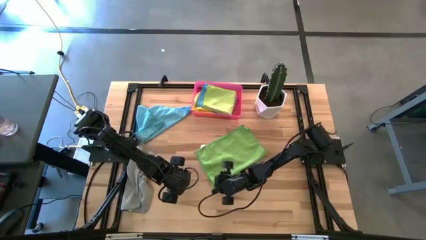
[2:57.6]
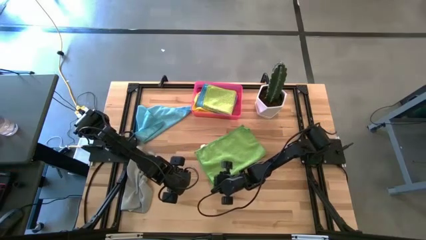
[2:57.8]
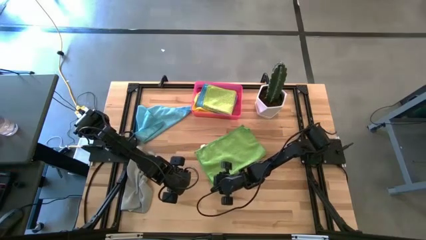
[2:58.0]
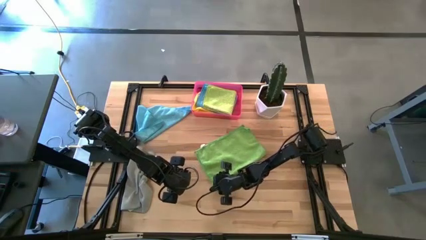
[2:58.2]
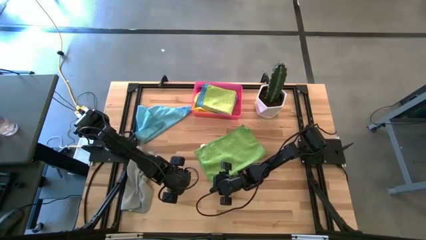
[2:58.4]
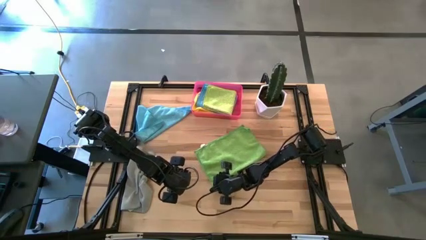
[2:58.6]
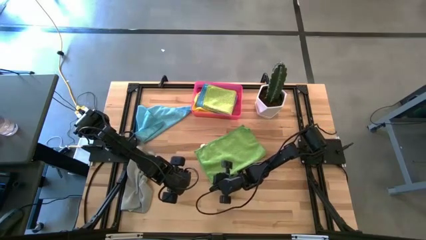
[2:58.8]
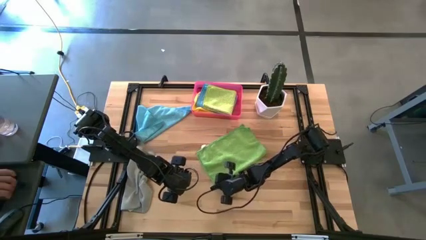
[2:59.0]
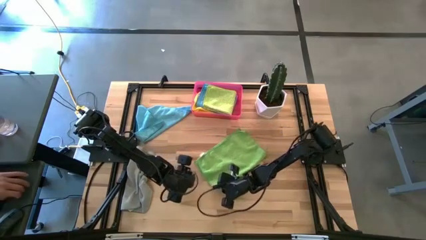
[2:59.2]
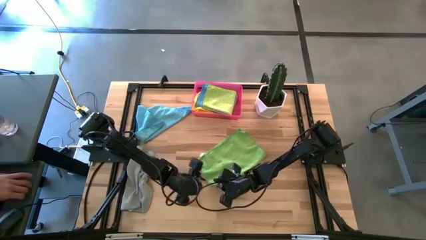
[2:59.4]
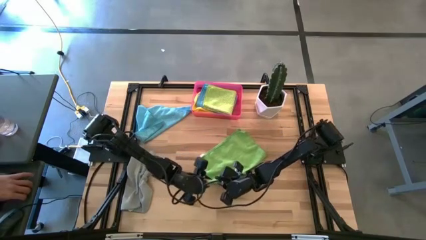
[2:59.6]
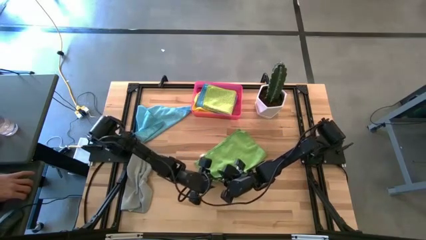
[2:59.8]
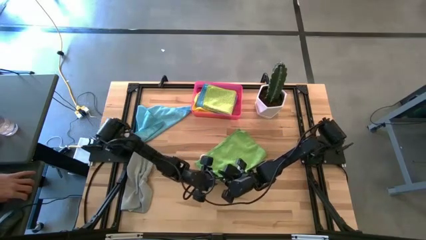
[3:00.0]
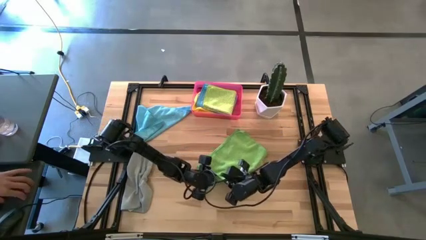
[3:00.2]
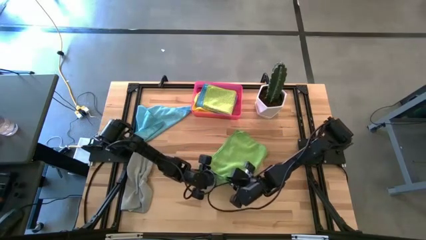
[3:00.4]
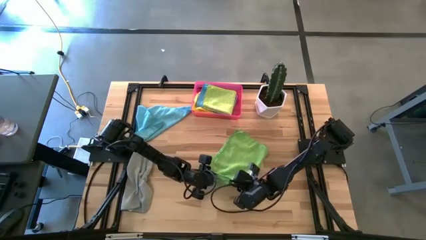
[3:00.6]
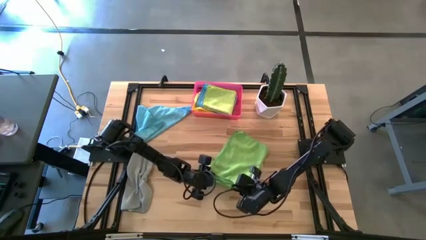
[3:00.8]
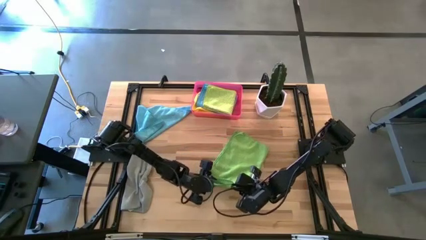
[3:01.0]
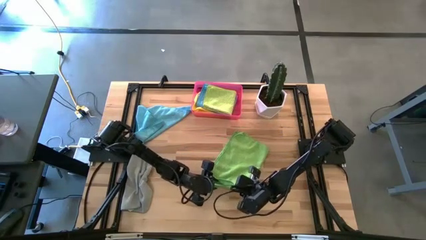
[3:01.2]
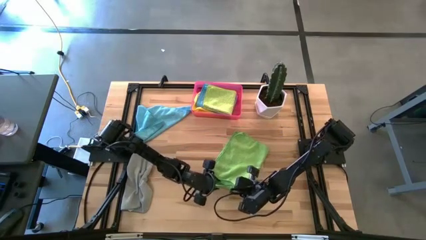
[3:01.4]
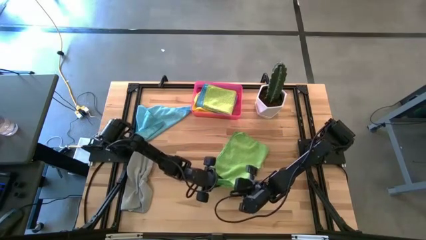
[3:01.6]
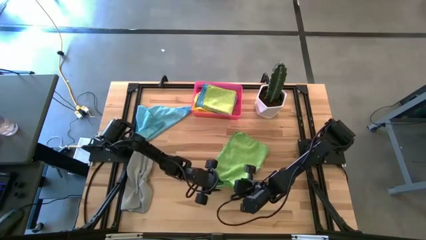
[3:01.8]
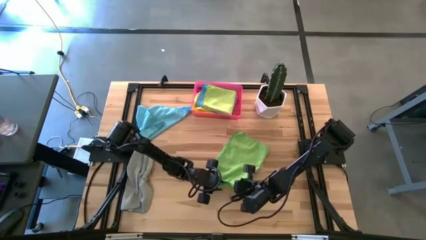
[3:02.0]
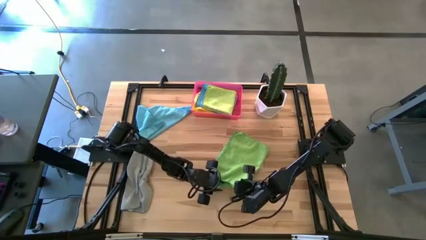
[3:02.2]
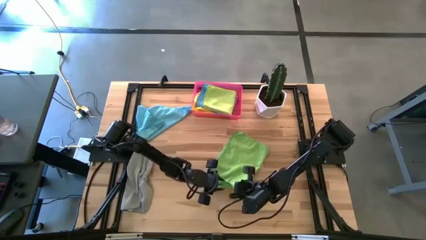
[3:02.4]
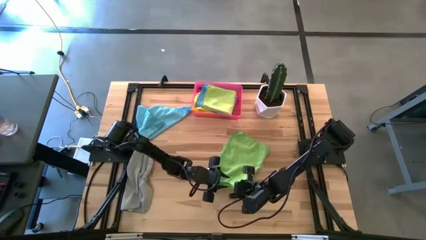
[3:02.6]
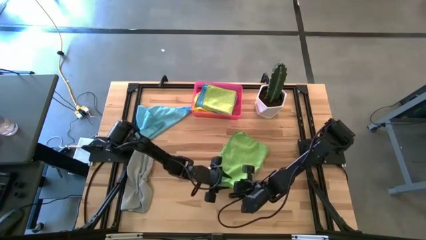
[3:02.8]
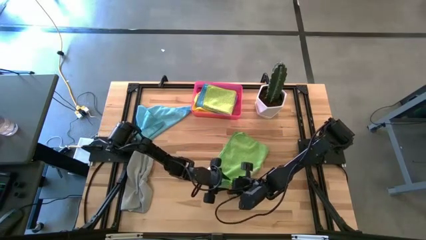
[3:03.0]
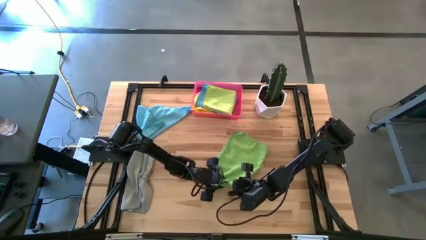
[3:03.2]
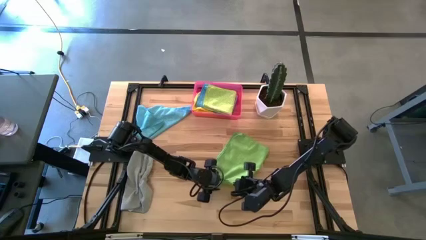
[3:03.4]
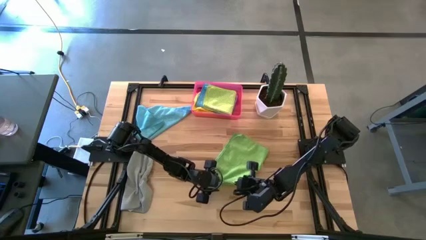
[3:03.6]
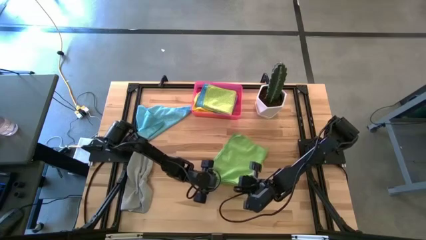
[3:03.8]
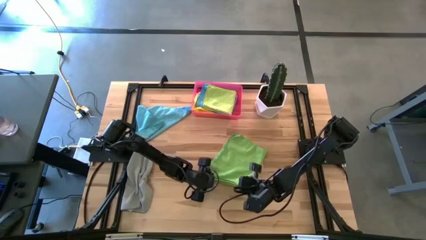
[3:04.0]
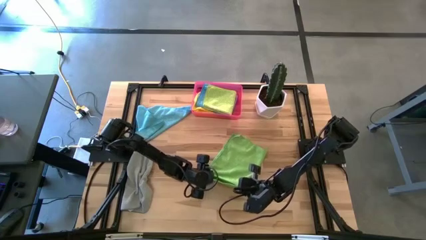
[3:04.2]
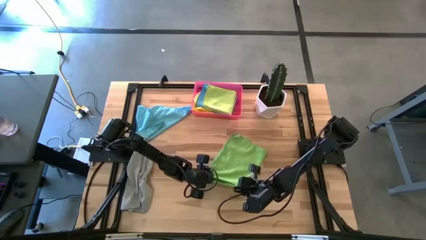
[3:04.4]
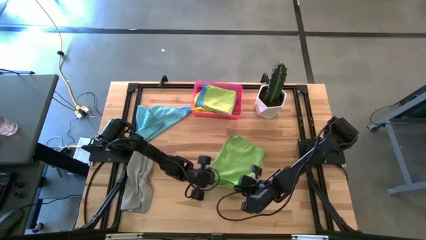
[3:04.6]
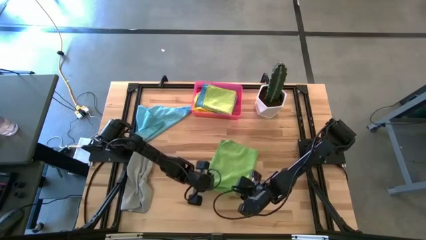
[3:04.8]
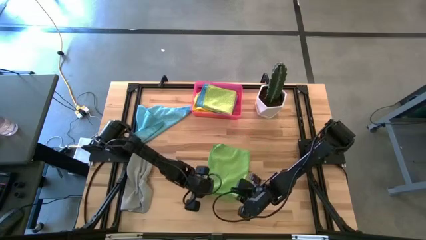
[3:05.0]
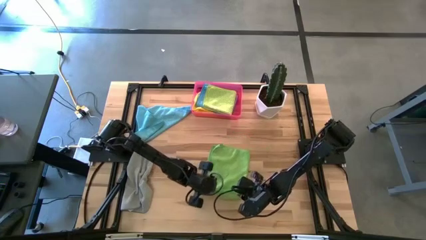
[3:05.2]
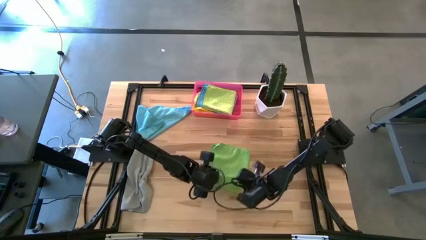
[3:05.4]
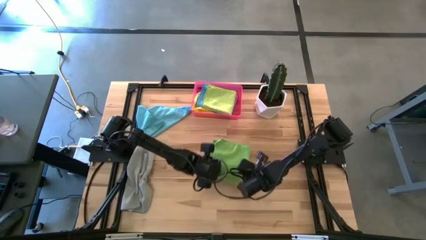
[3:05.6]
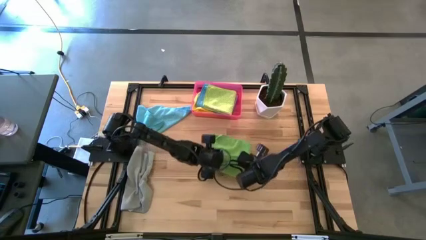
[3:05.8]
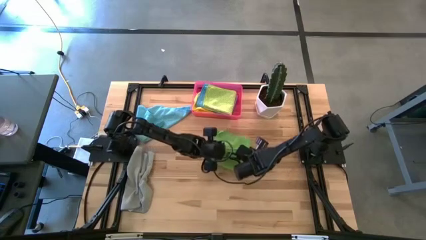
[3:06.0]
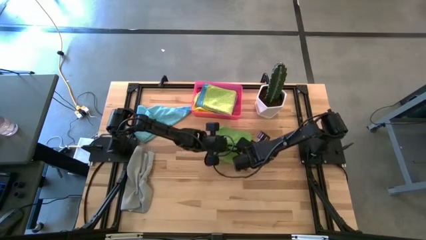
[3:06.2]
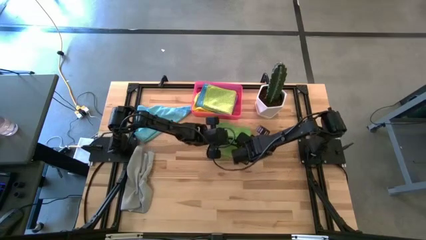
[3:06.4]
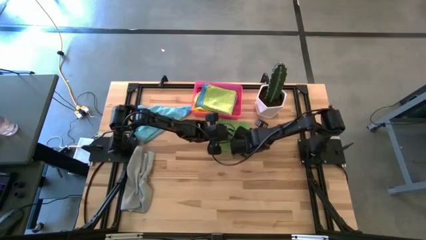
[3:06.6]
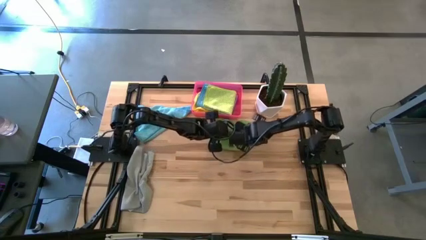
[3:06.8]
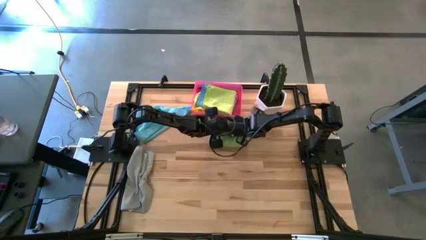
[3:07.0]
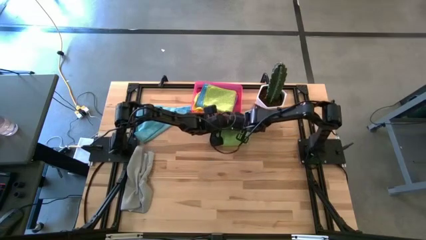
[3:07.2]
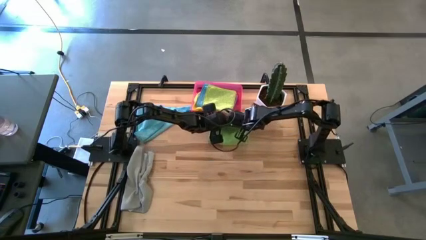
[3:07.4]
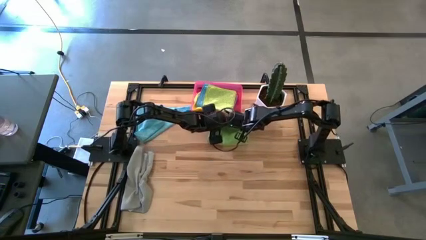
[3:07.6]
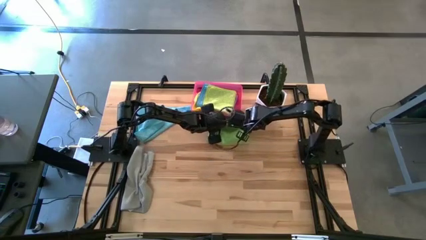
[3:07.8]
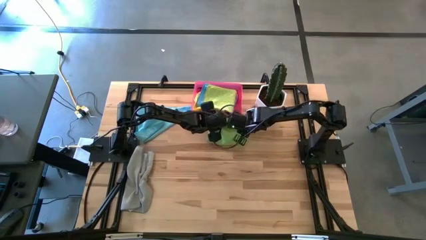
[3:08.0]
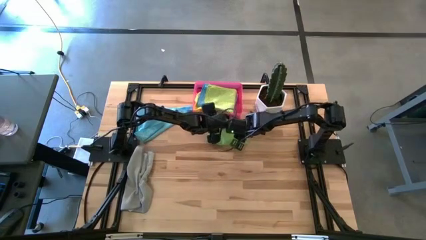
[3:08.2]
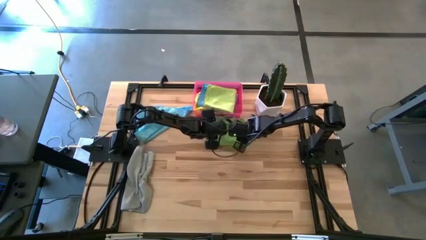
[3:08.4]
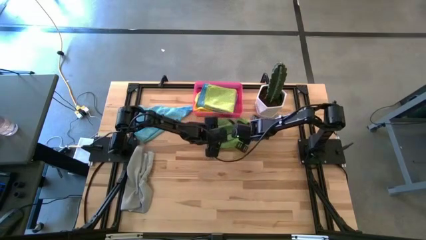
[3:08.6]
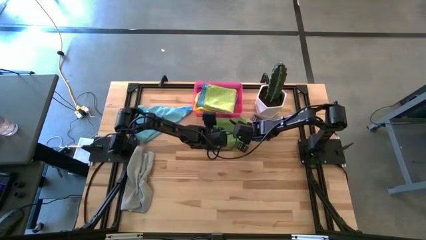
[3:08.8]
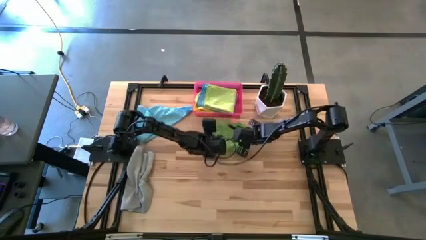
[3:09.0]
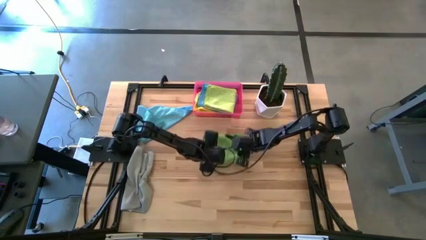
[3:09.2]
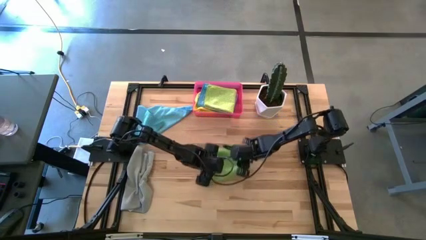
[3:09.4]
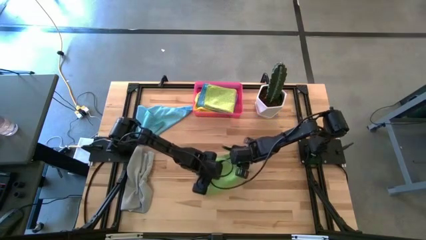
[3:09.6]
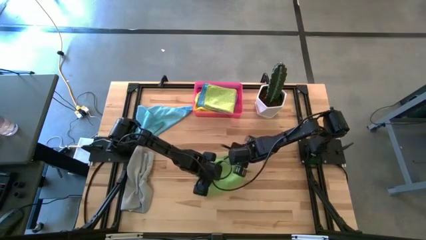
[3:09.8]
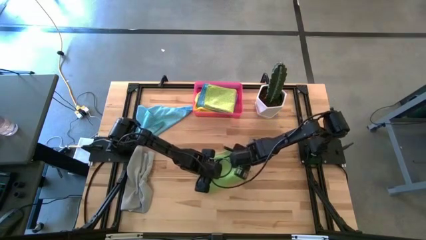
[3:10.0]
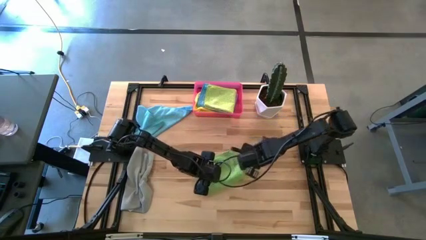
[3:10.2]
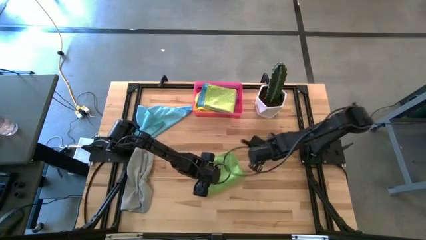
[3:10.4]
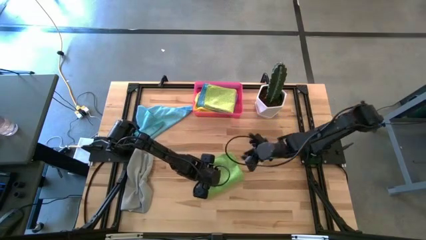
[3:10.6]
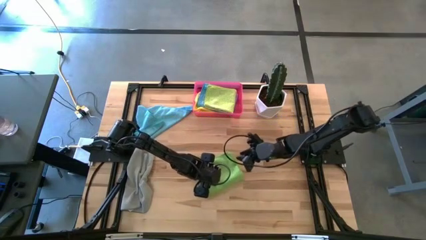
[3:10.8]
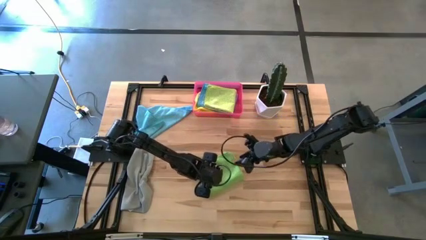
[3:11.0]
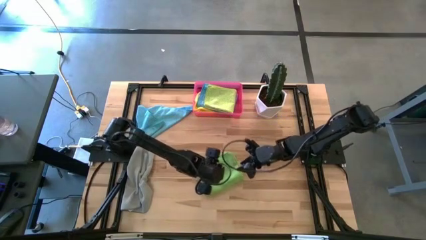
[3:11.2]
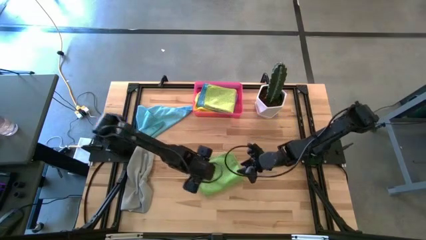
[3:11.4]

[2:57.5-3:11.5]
Task: Fold microfiber towels
Fold the green microfiber cloth on the table

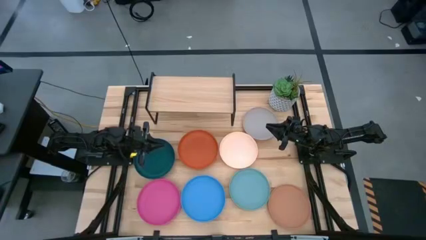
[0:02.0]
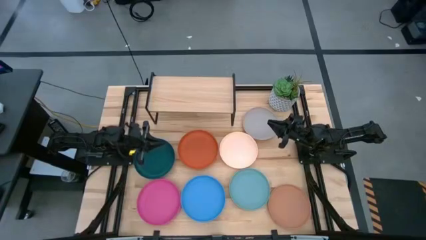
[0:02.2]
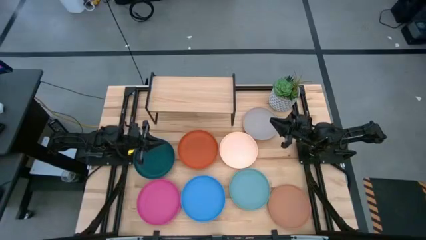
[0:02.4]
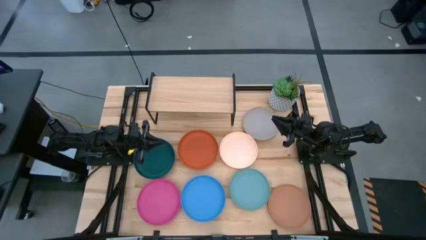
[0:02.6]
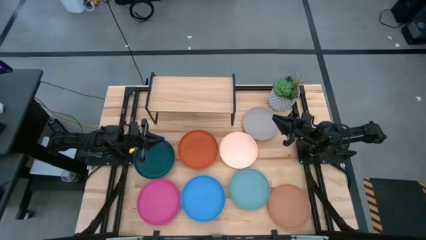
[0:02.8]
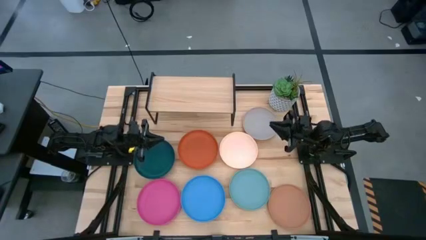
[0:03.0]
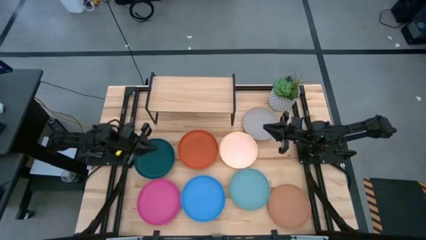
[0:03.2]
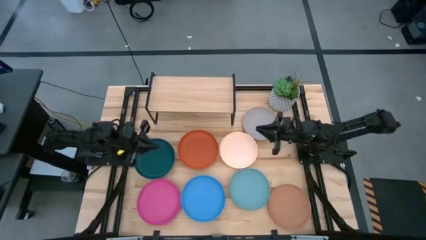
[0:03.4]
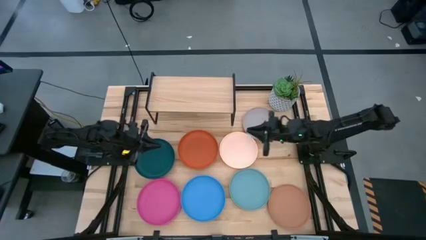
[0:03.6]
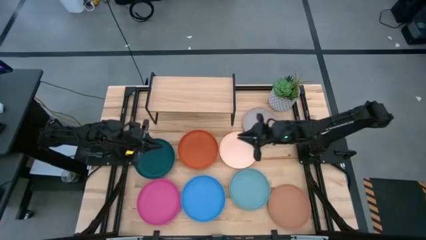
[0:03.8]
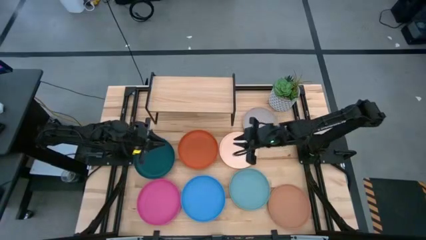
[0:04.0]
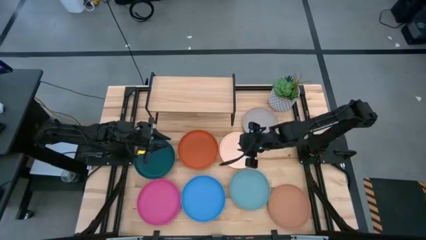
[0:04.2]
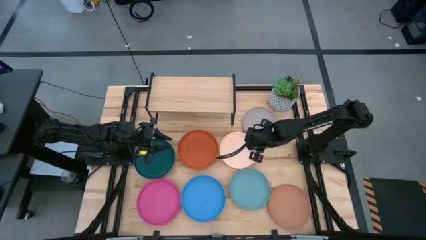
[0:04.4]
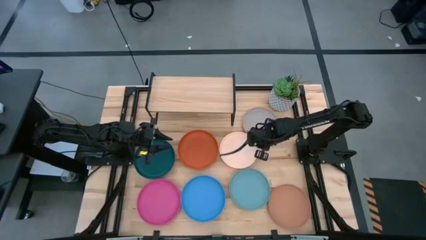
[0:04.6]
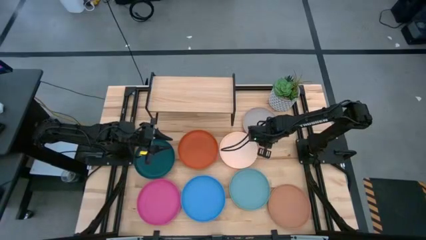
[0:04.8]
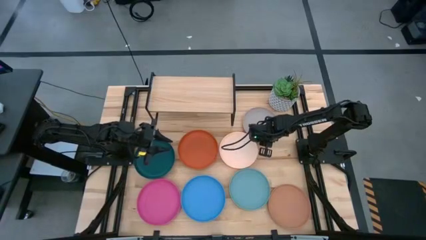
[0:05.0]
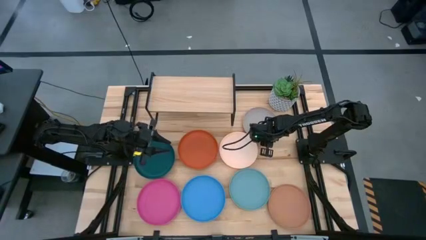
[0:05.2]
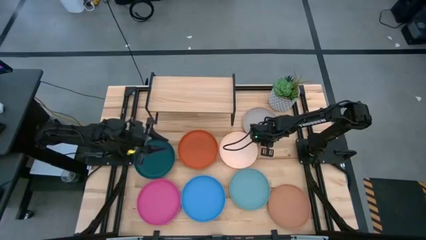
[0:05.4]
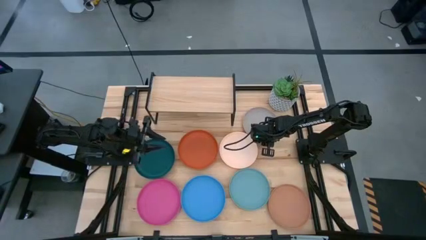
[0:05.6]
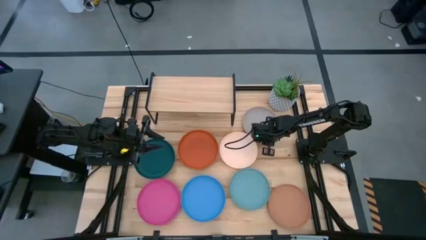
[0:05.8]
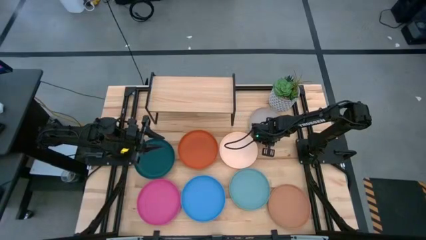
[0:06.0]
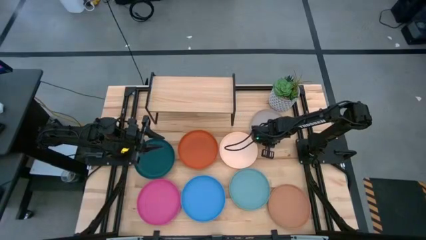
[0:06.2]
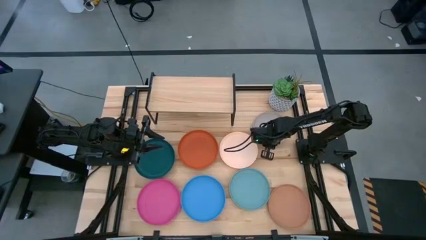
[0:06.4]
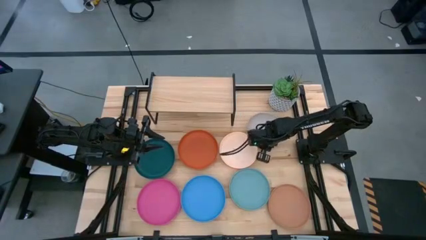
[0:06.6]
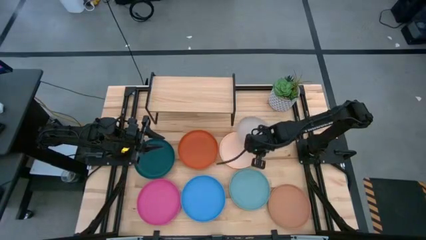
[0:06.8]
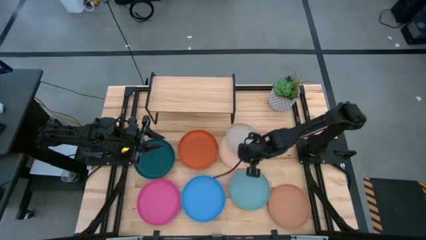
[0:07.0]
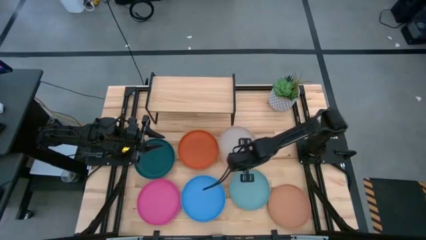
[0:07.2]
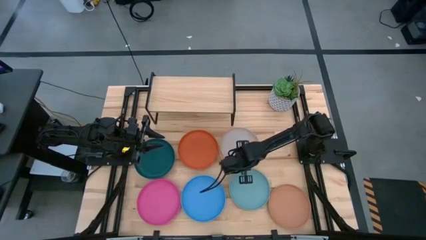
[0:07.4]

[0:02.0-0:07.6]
Task: Place and stack plates onto a shelf
Stack the gray plate on top of the light orange plate
